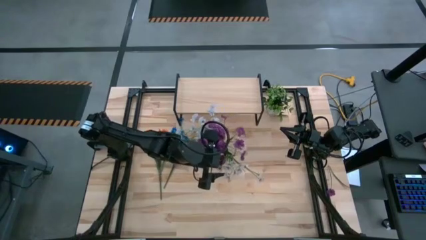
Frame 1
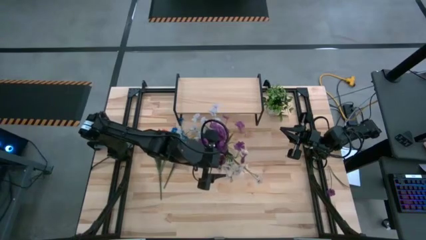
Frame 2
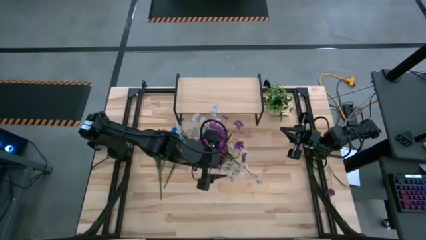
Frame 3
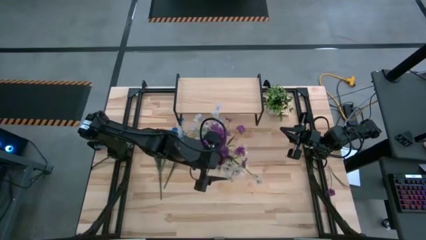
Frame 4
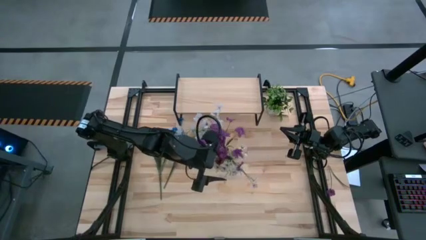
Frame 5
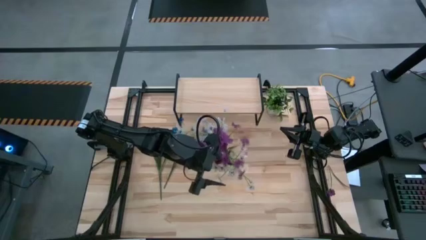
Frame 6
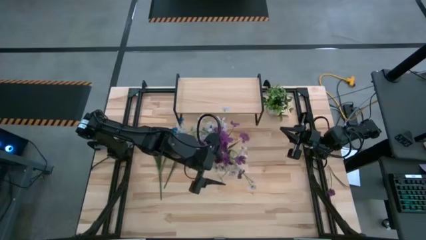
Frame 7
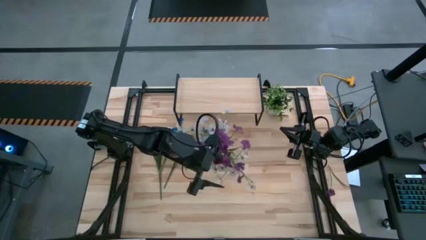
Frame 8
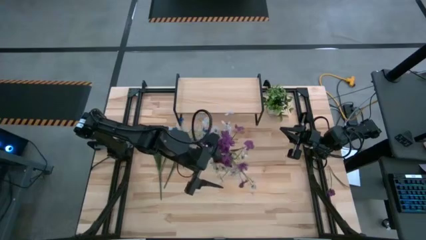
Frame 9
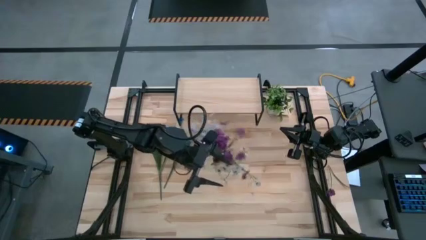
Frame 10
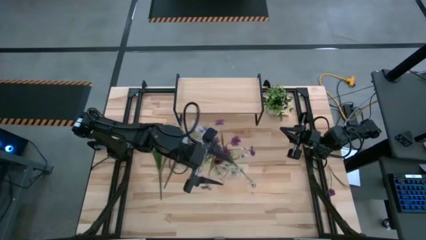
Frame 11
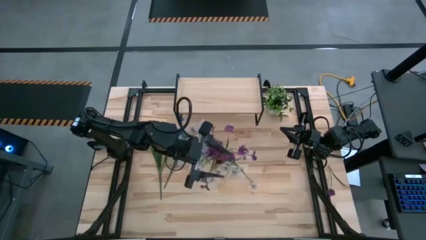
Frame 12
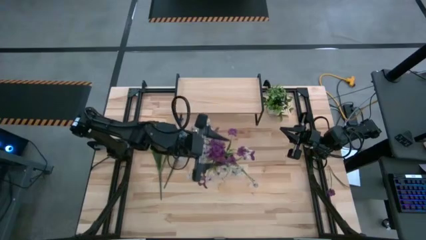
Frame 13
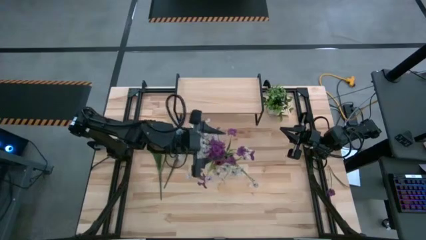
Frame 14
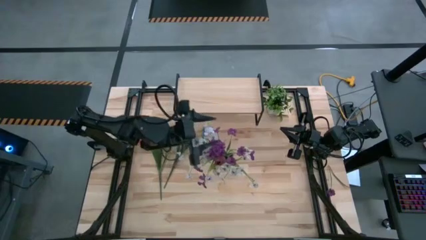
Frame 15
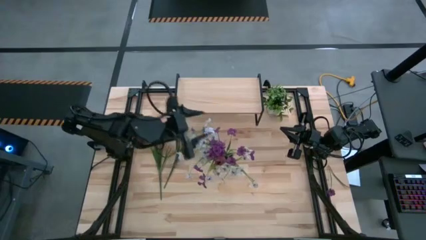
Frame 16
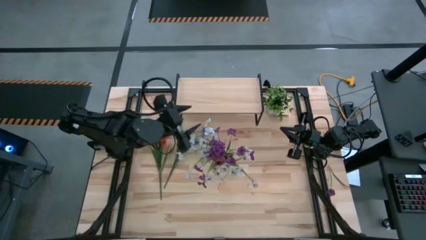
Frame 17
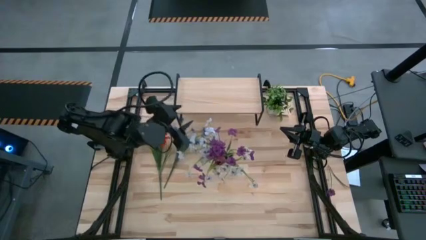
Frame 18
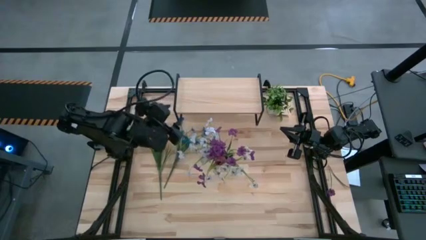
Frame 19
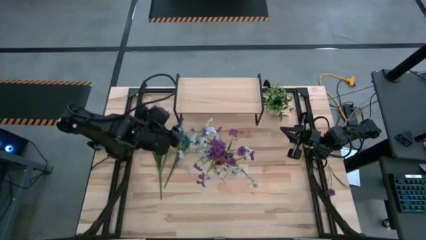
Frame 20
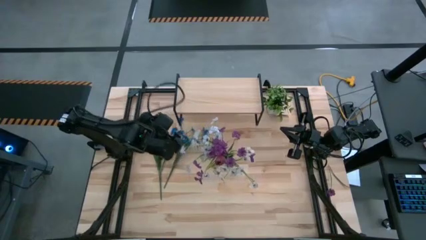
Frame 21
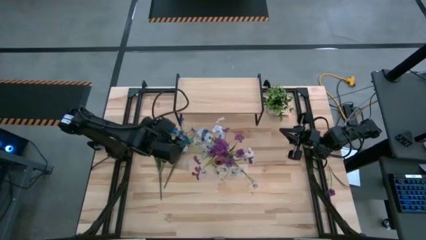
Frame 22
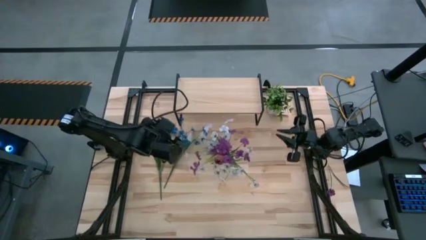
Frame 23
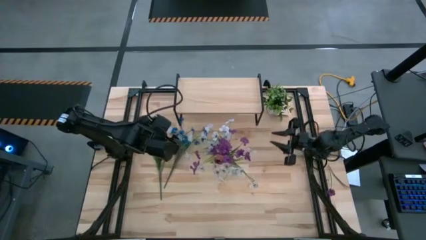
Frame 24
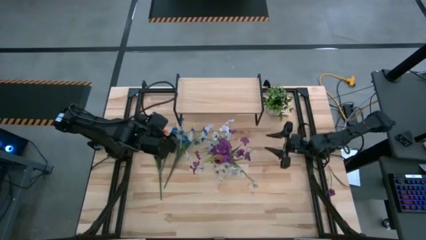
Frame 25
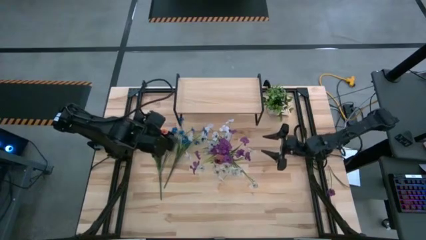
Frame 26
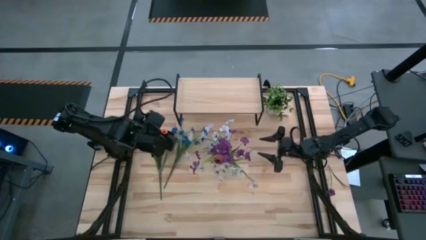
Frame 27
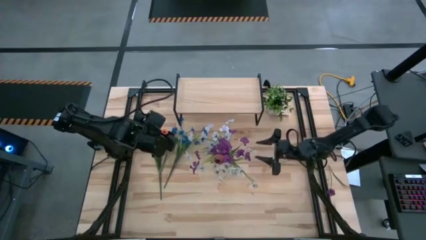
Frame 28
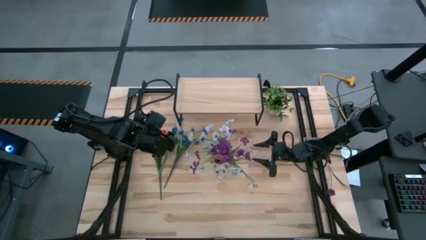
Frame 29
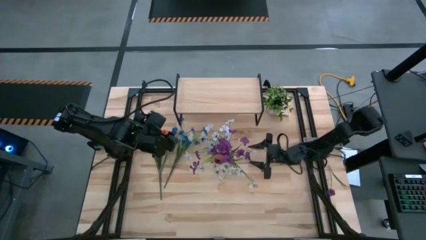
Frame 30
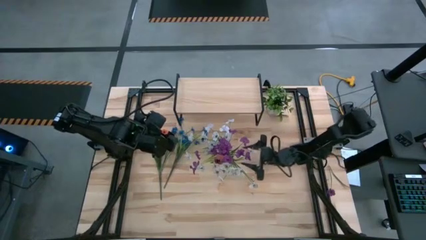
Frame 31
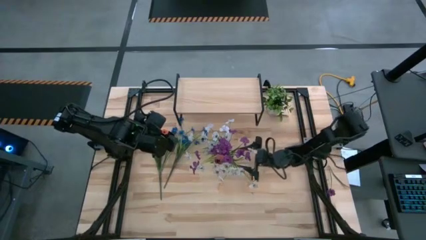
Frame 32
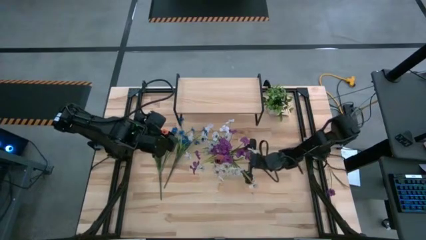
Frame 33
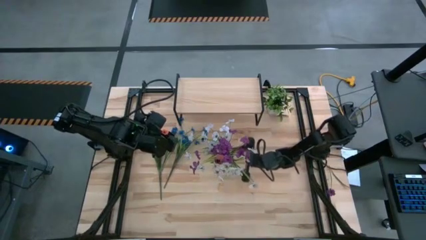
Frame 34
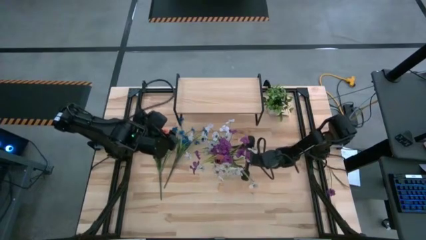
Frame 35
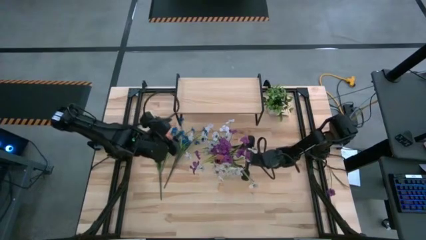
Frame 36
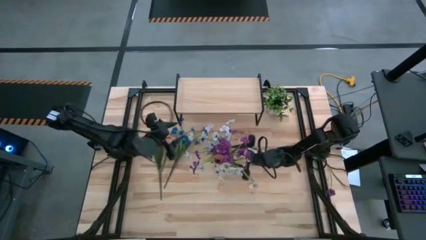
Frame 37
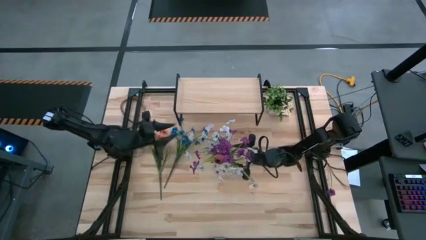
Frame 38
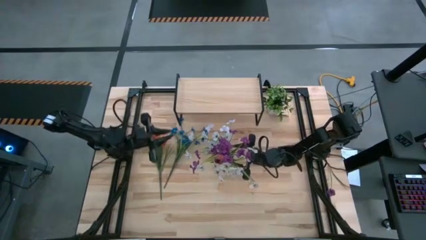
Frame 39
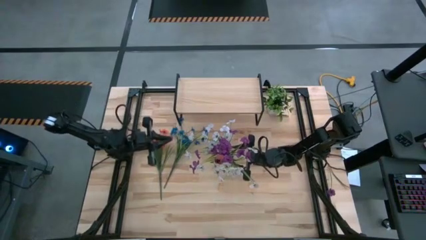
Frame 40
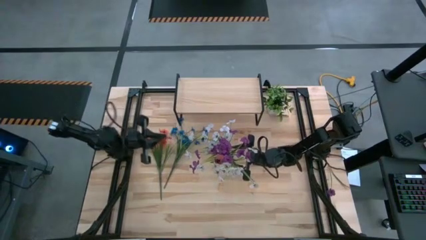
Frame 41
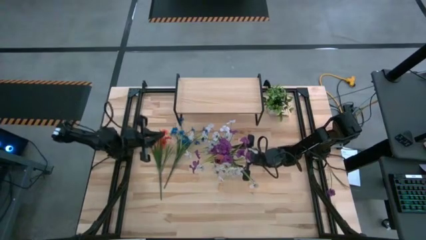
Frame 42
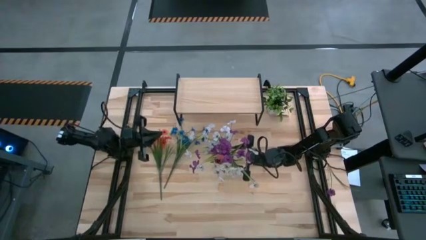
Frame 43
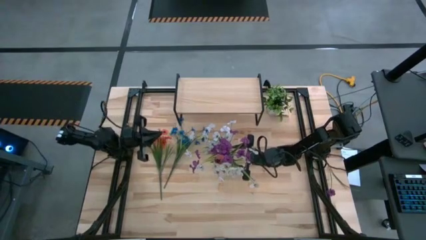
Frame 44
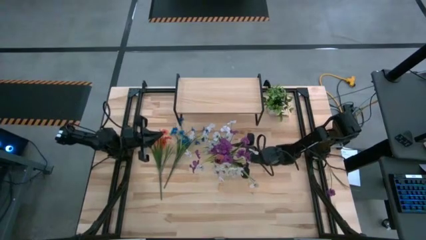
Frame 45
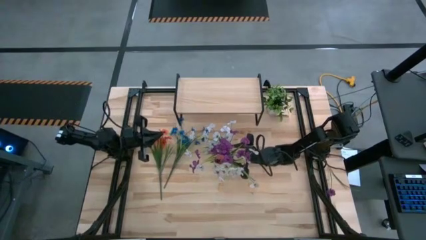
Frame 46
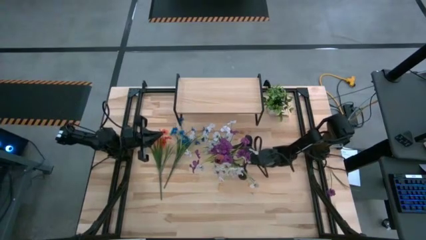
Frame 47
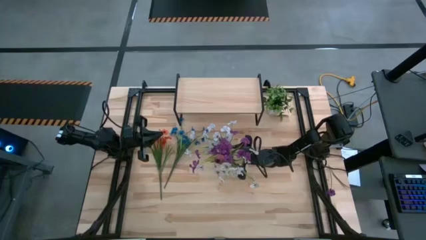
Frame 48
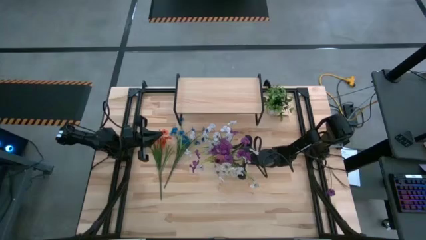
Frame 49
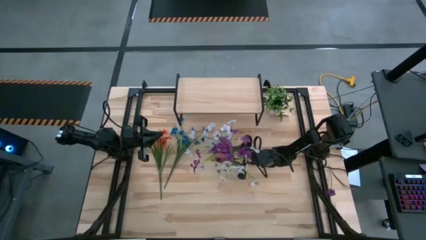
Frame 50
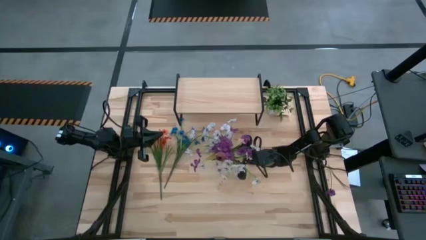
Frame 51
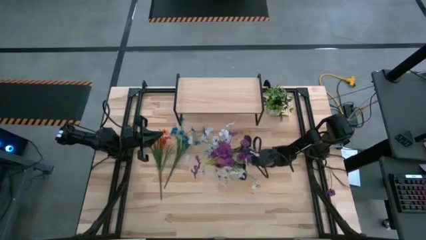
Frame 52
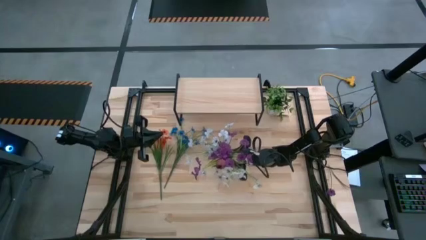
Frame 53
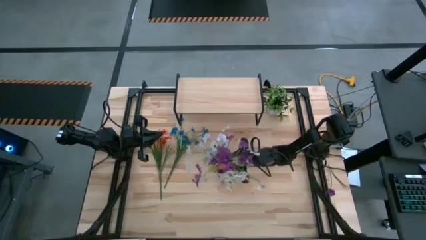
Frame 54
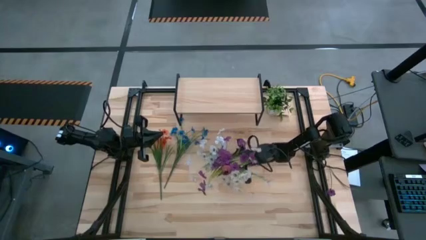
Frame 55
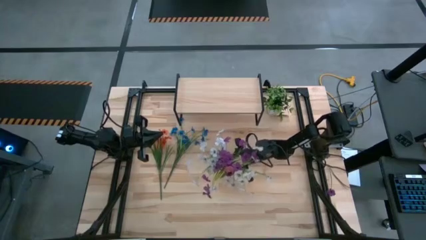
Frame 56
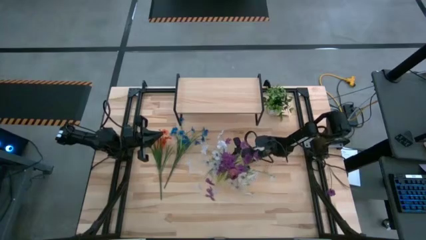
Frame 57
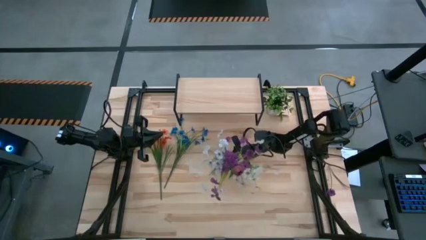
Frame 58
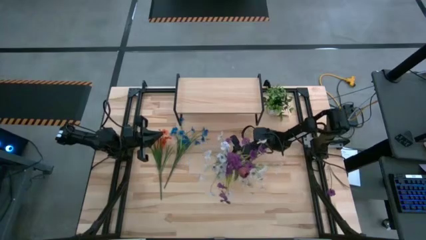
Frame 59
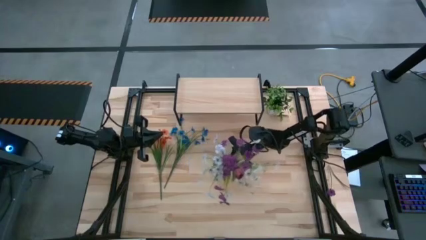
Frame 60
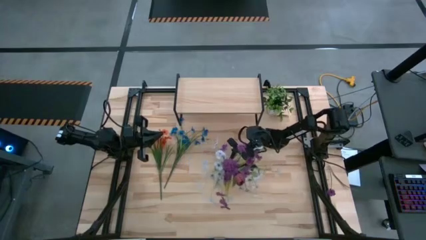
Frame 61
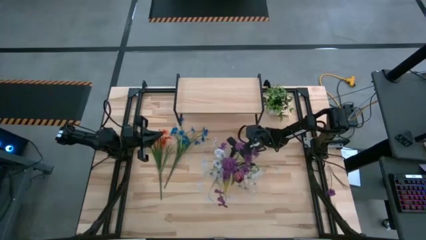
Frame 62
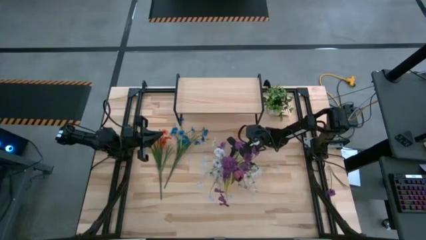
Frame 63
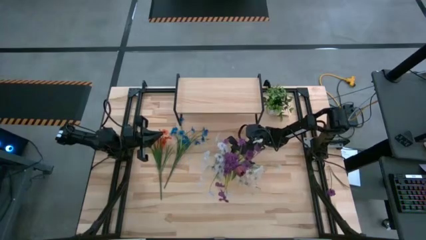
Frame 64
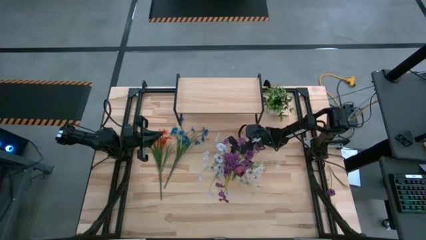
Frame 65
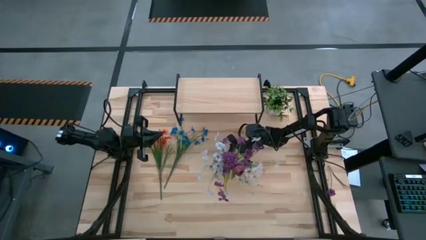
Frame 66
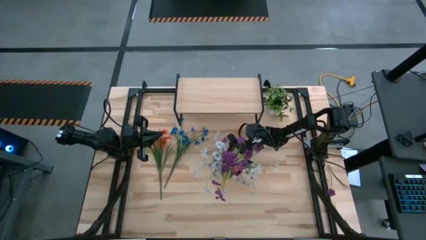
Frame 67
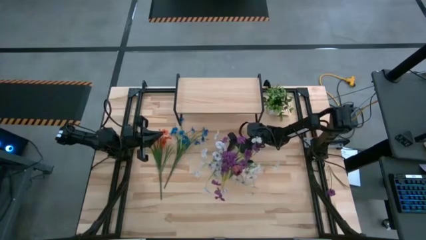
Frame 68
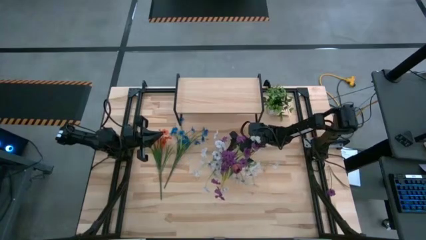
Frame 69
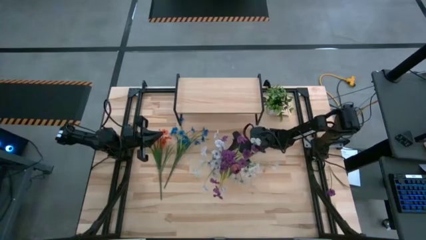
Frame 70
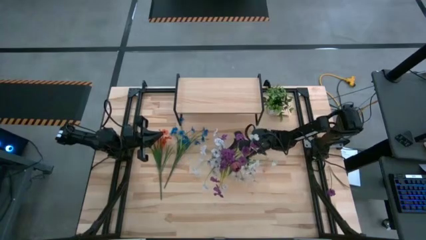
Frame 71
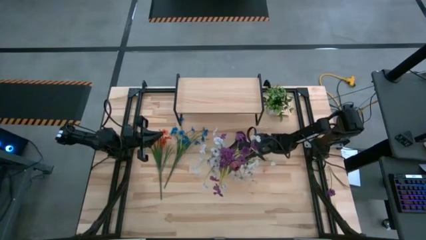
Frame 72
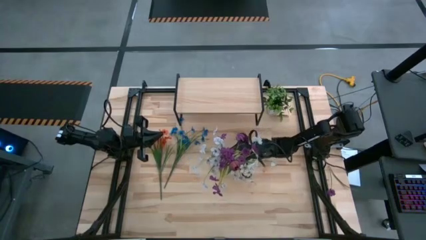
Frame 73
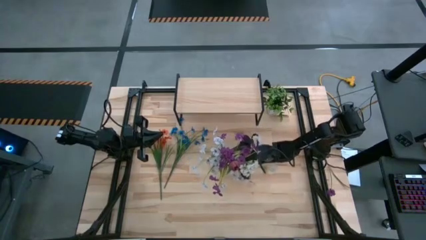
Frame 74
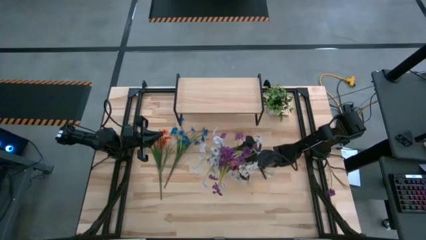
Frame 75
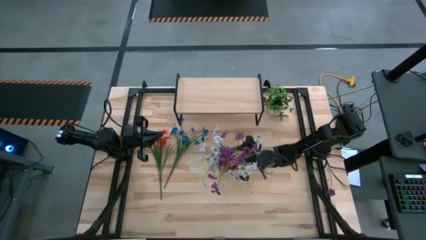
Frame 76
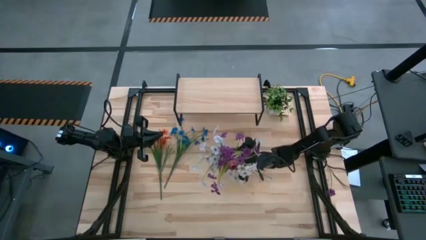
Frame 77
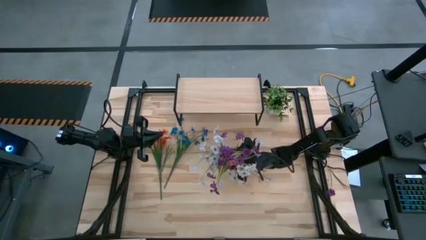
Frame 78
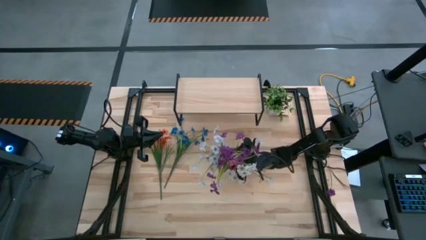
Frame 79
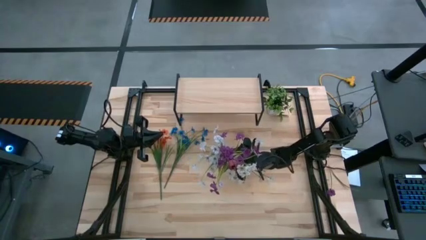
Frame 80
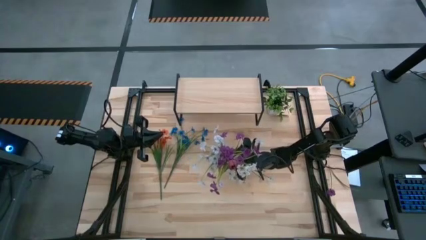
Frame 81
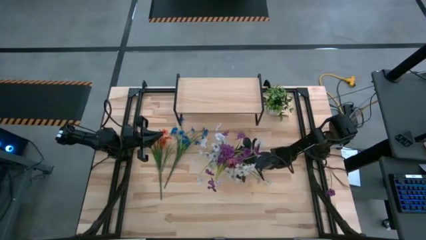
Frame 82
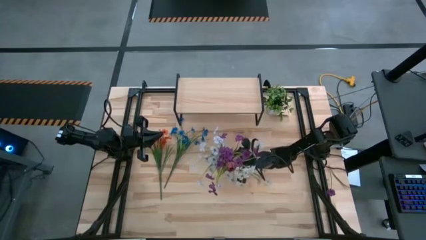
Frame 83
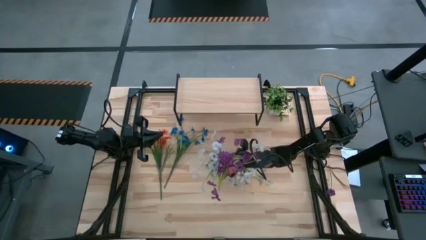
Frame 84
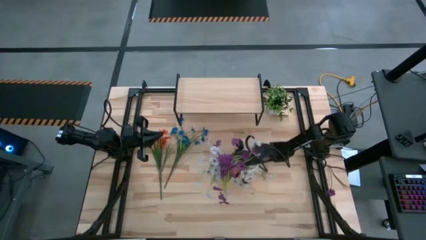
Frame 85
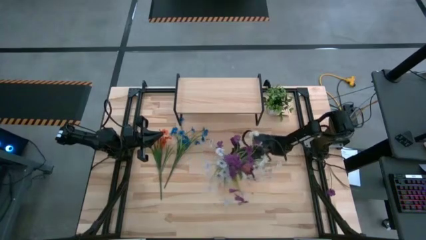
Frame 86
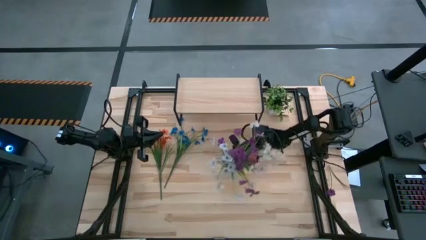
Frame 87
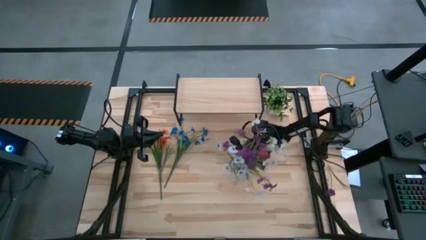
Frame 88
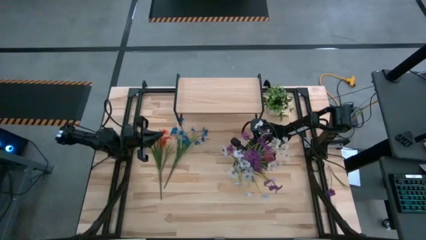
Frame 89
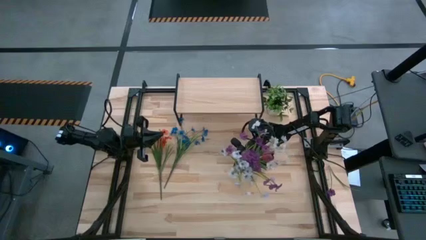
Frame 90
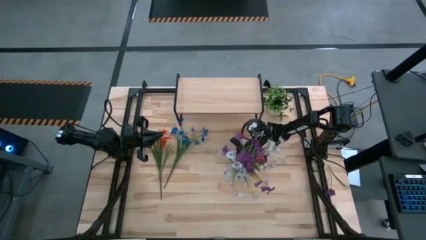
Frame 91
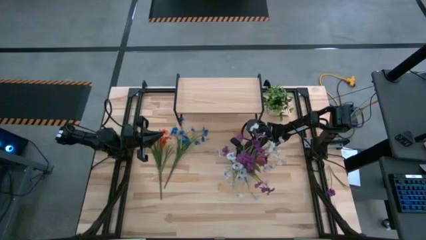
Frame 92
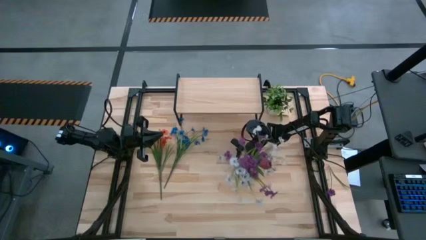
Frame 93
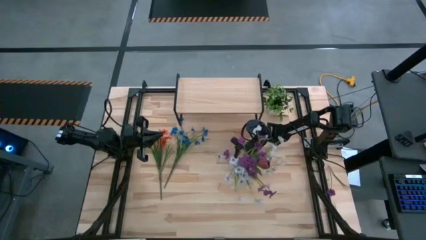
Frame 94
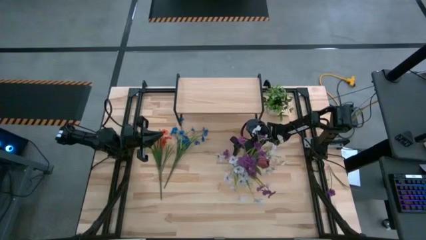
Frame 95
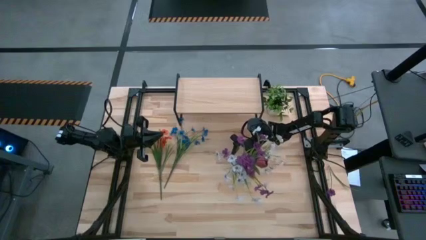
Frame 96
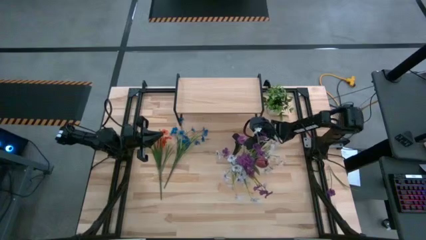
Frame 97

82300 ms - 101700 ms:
Task: Pick and place flowers into a vace then onto a shelf
Adjust the transparent vase
